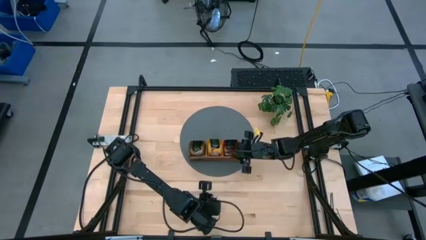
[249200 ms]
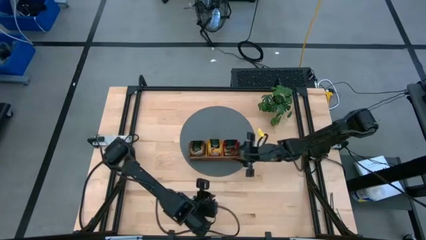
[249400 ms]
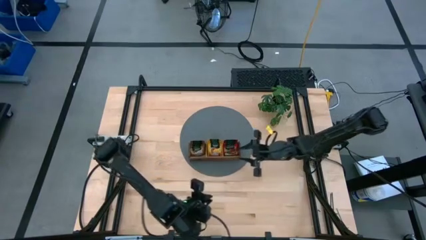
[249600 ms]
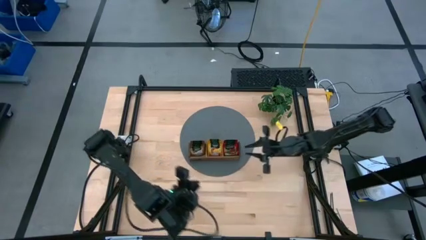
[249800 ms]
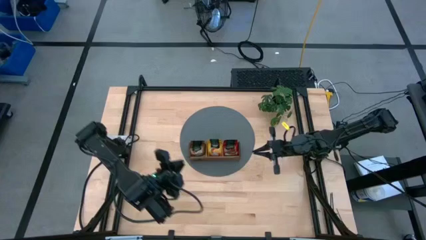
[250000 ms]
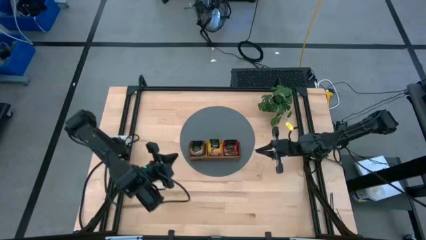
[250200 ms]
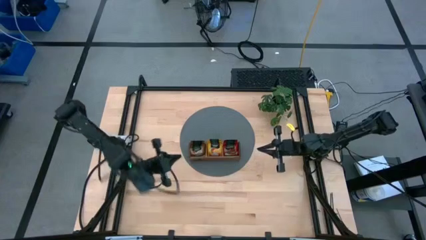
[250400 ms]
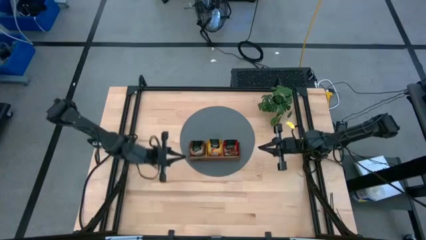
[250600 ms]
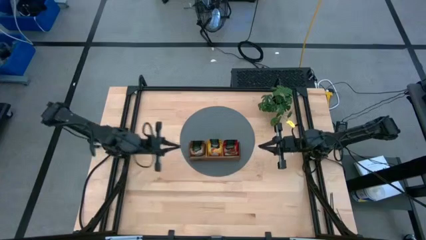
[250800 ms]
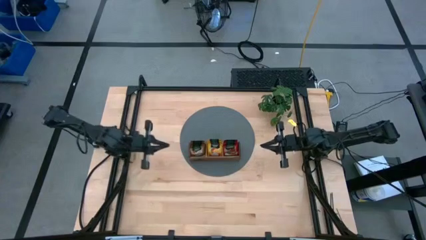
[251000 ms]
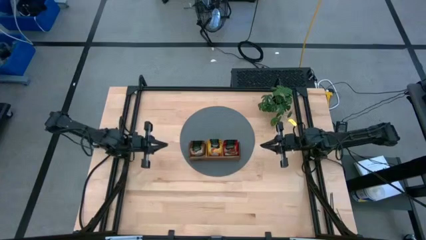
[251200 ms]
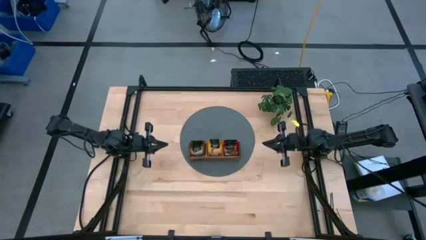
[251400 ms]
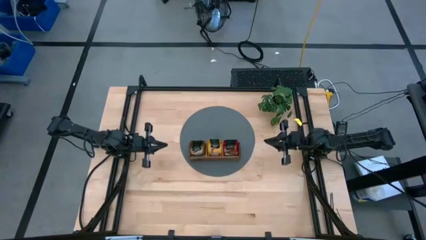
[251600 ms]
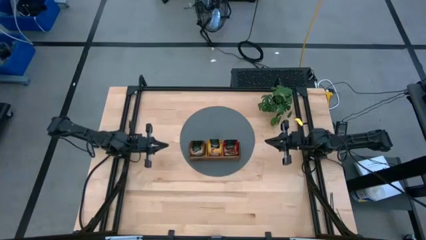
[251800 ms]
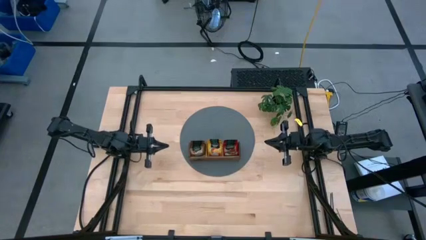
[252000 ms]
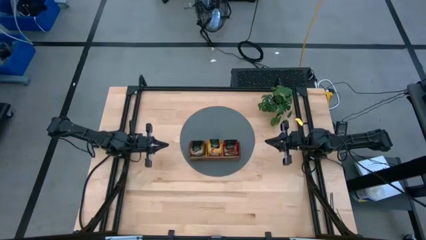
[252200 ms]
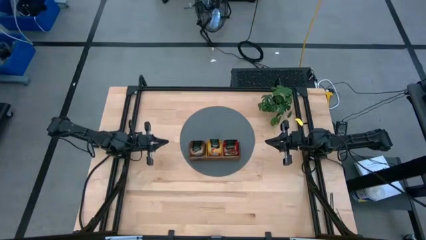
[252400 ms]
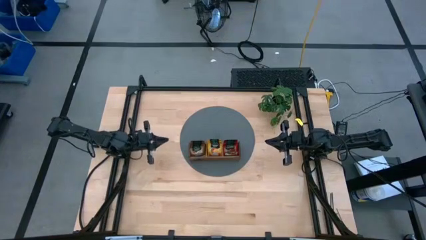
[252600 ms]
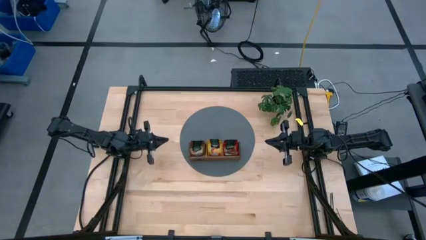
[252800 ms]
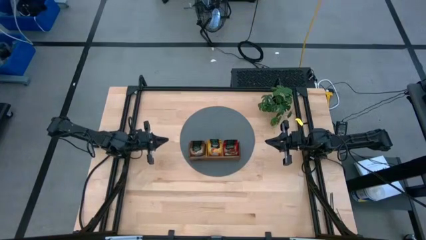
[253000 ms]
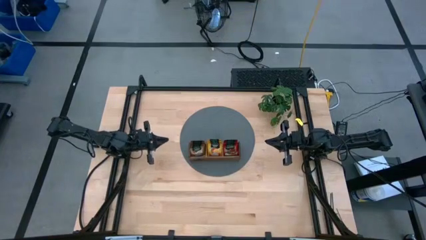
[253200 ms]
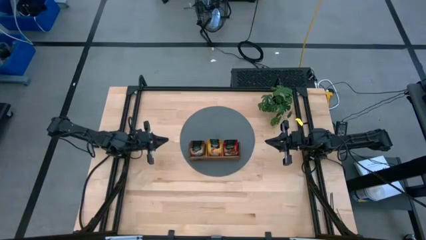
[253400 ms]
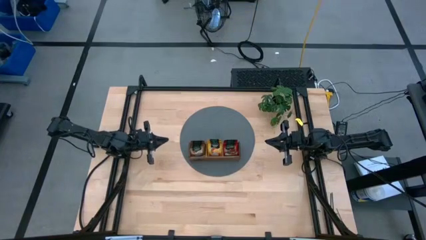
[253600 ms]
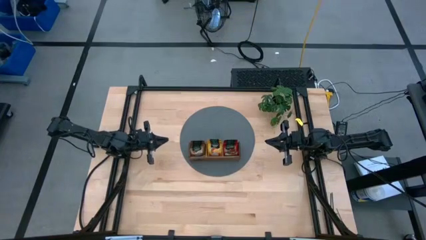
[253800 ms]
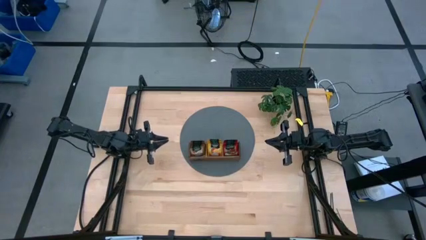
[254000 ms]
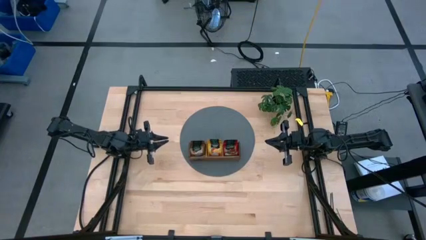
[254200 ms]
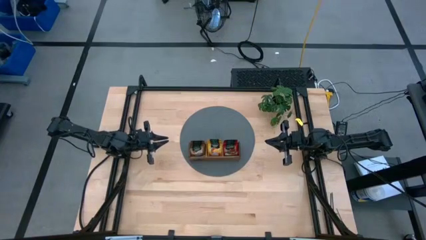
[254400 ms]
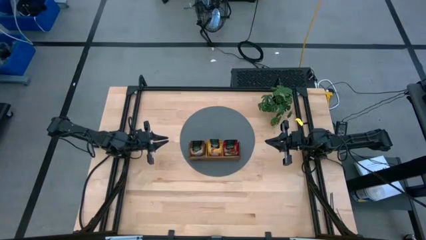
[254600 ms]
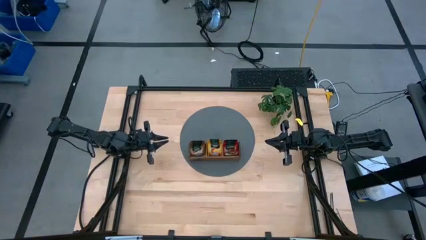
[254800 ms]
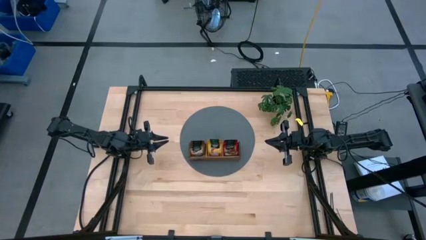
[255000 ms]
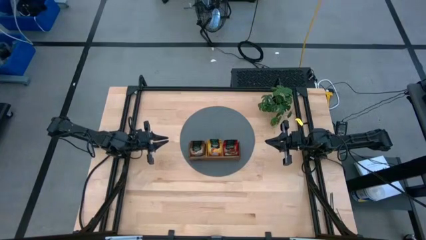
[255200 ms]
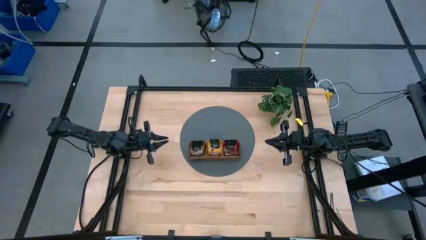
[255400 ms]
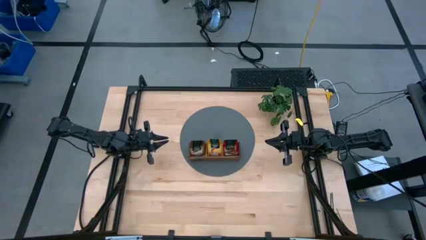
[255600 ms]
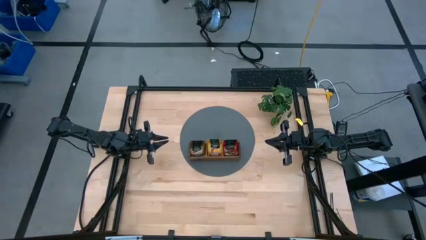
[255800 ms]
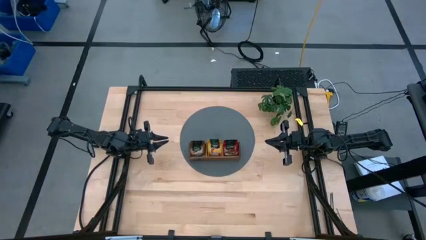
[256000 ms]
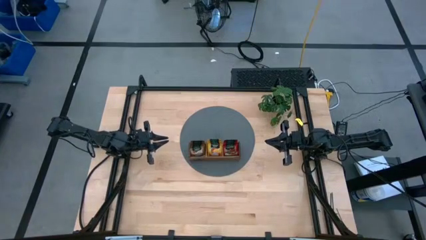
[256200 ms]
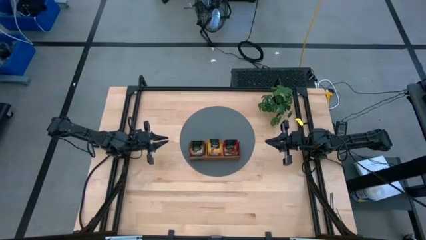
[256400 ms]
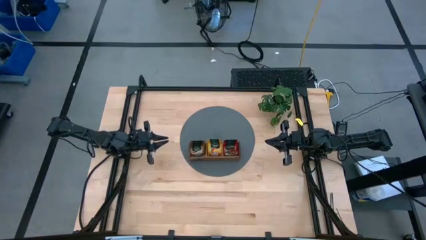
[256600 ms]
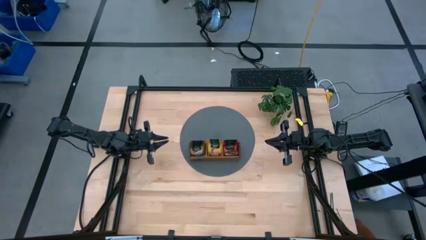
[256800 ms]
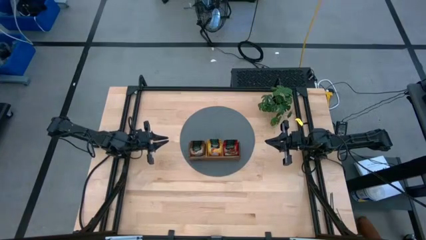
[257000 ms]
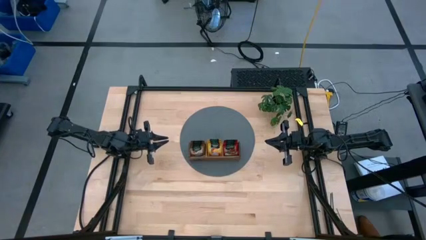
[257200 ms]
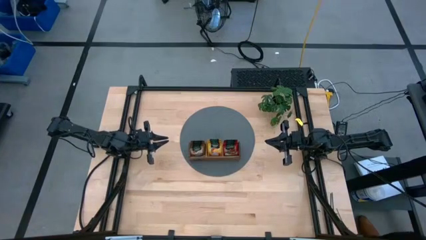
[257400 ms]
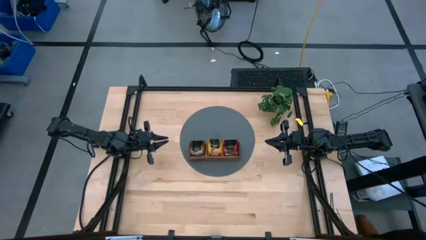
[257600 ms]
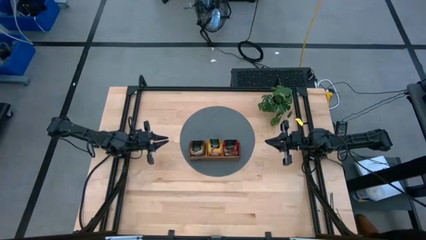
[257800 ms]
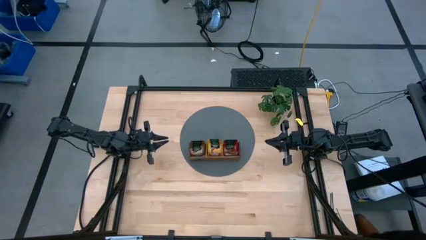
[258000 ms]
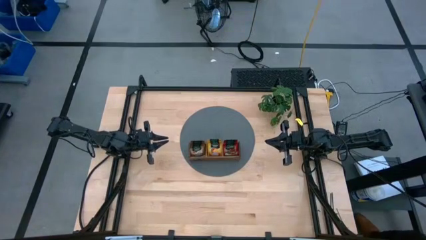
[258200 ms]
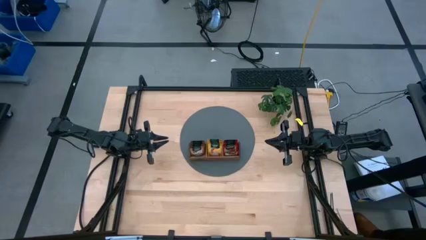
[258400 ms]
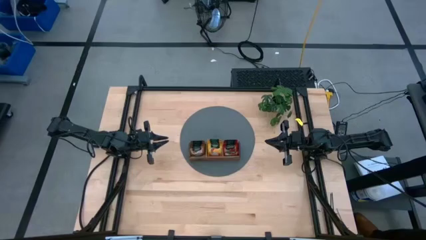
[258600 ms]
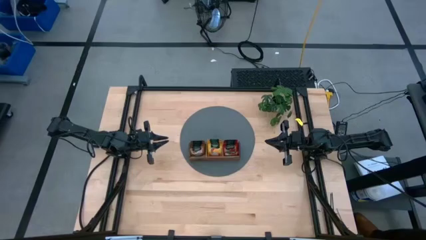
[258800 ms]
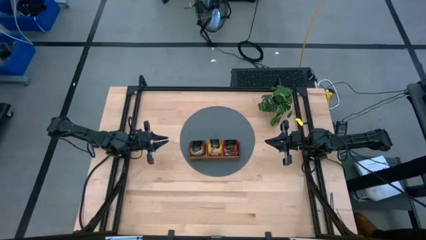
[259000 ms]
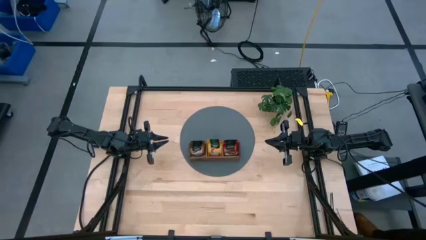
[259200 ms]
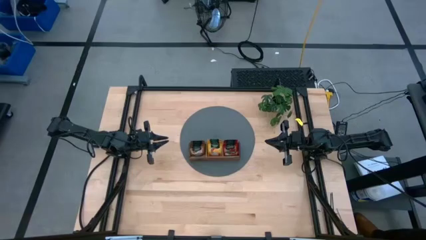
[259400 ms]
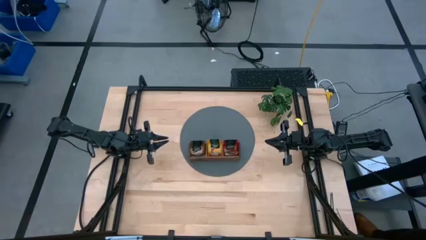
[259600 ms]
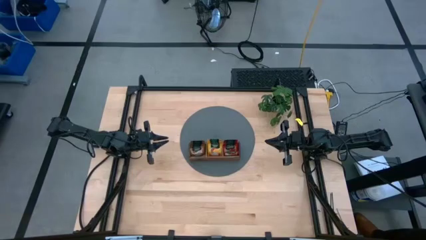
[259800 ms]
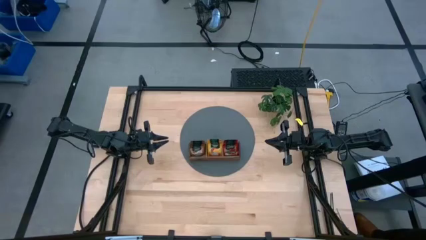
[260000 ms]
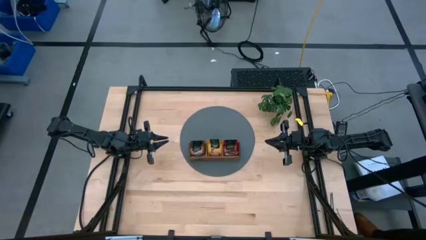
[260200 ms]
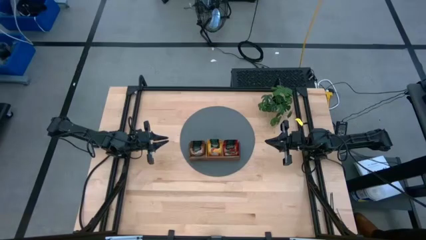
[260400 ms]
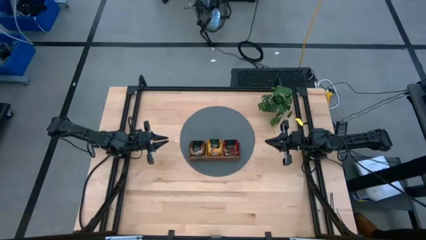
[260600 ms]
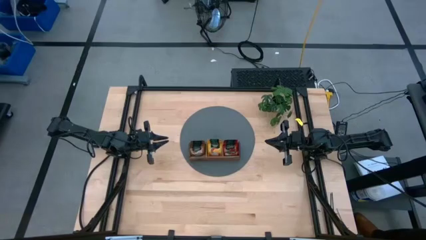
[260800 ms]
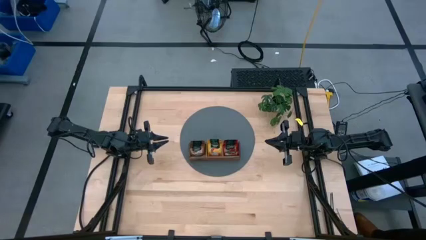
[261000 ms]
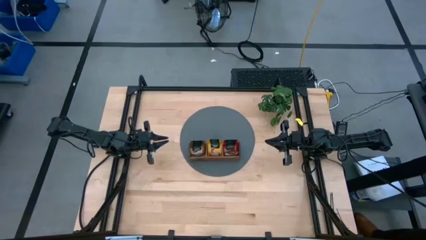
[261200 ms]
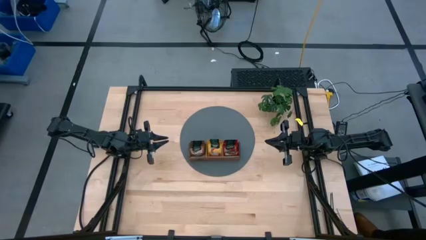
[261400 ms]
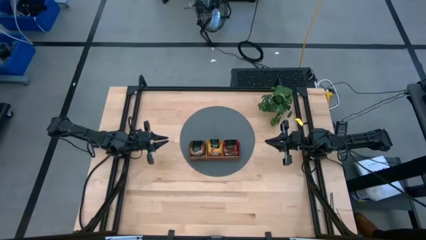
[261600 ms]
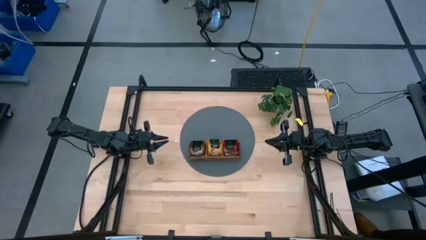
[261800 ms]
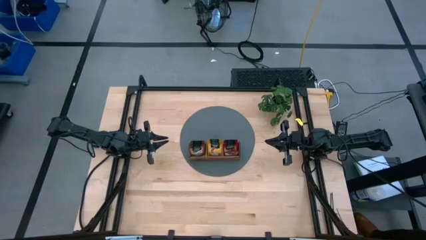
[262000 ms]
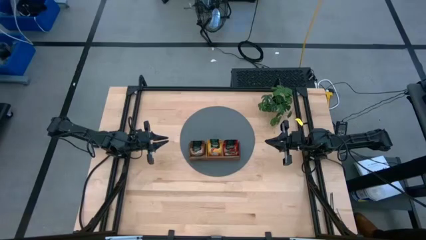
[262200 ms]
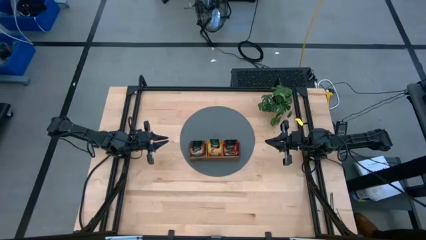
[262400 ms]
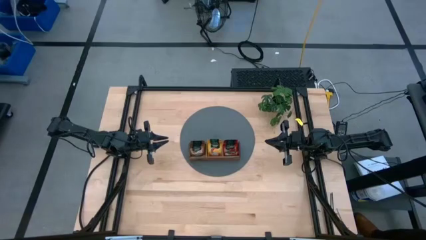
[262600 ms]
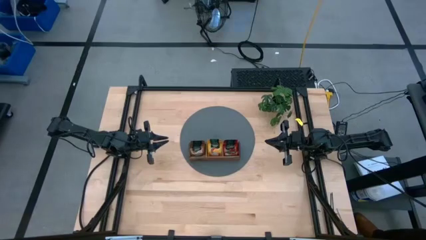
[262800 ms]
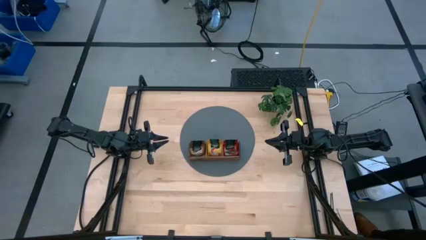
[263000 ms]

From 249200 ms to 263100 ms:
Task: Pick & Place Tea
Return to Home Position
